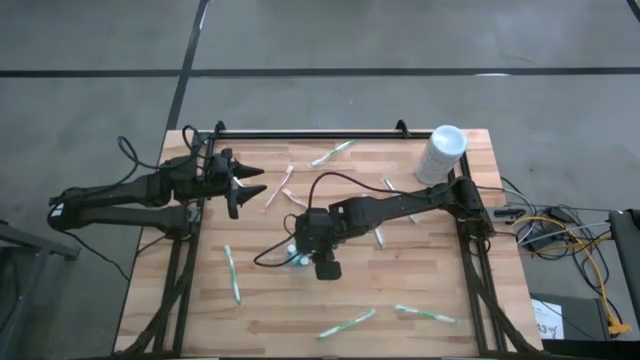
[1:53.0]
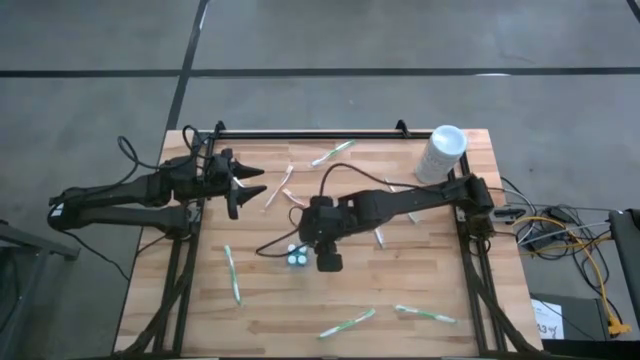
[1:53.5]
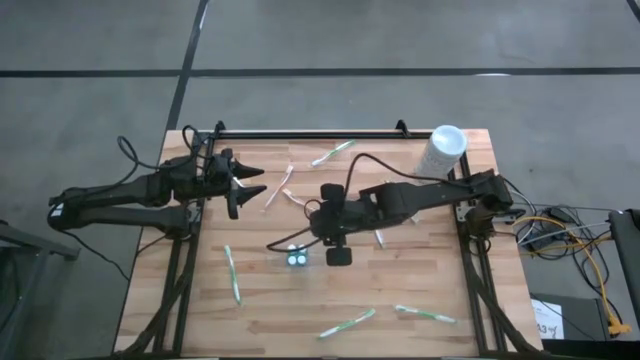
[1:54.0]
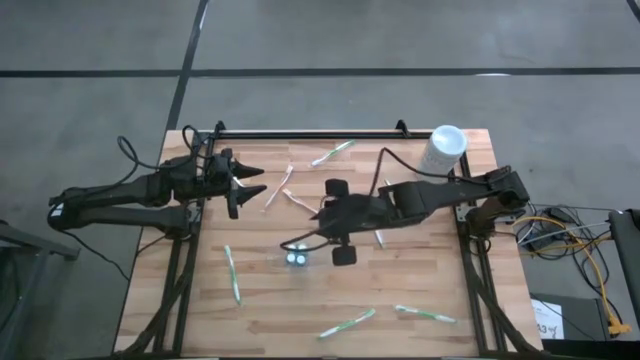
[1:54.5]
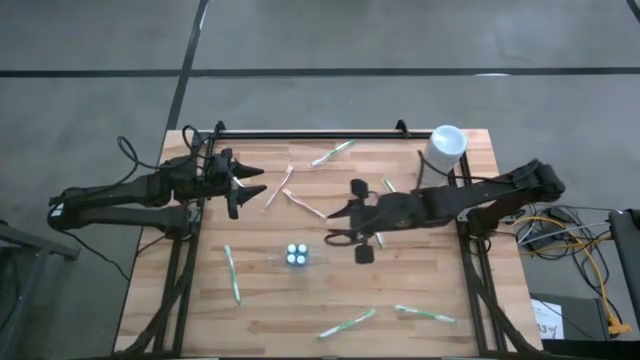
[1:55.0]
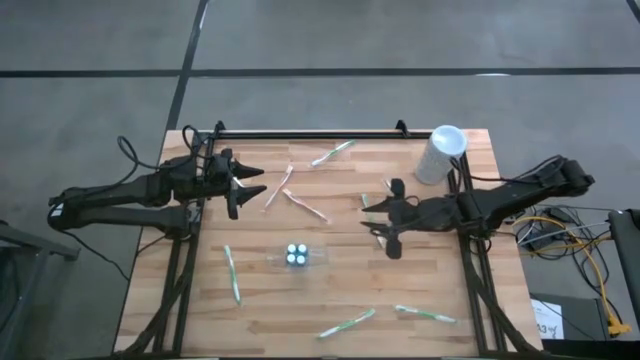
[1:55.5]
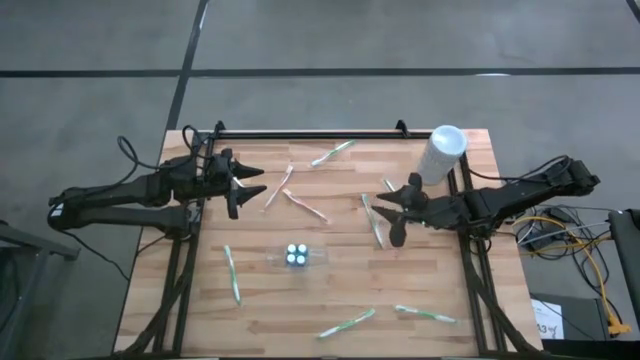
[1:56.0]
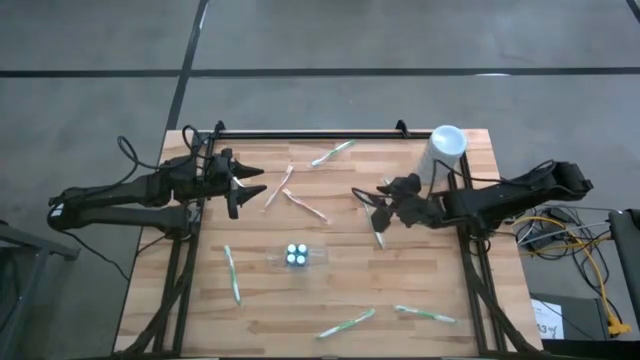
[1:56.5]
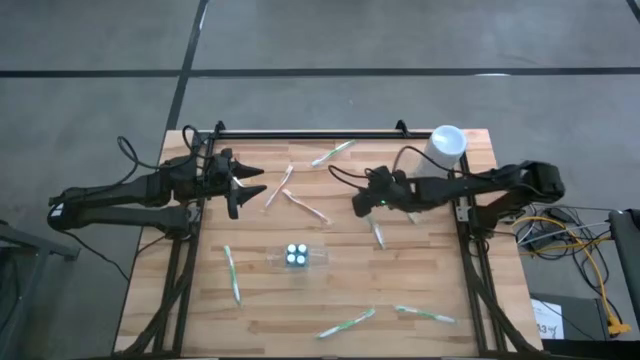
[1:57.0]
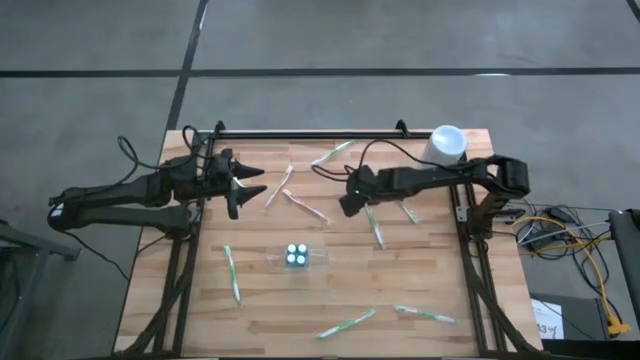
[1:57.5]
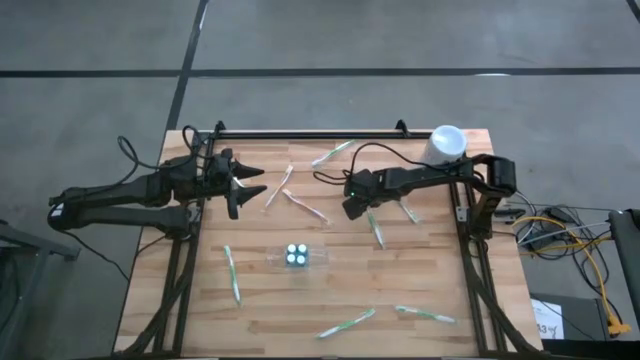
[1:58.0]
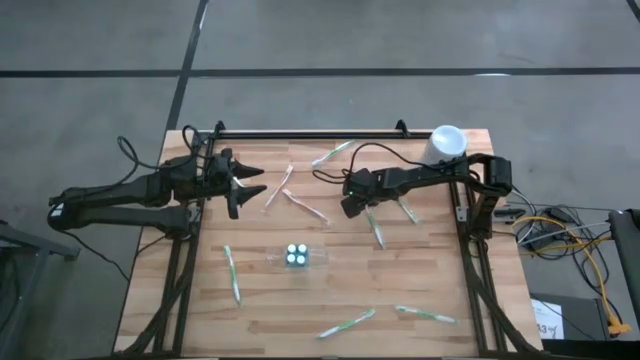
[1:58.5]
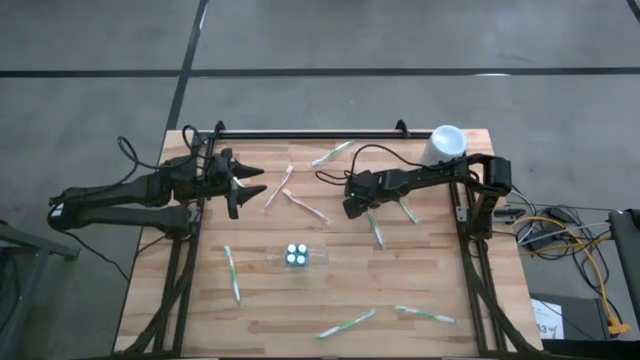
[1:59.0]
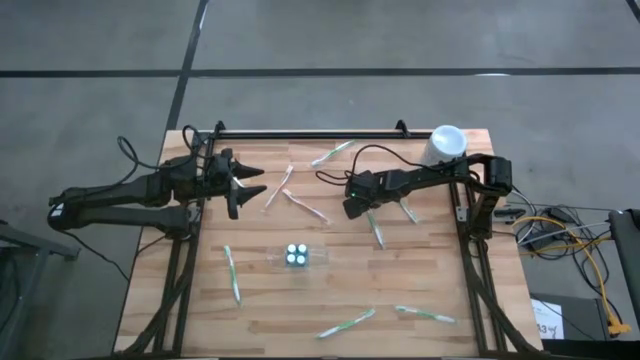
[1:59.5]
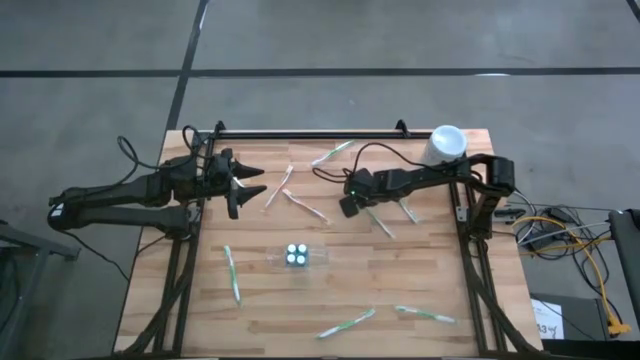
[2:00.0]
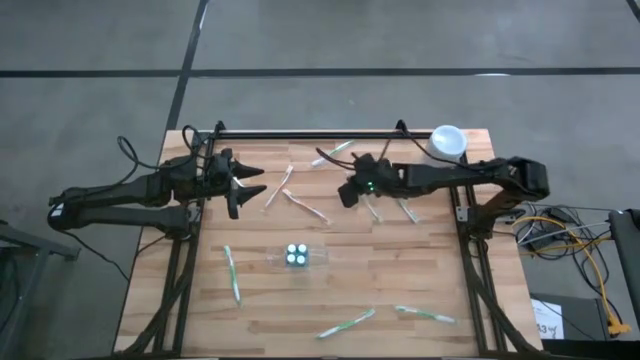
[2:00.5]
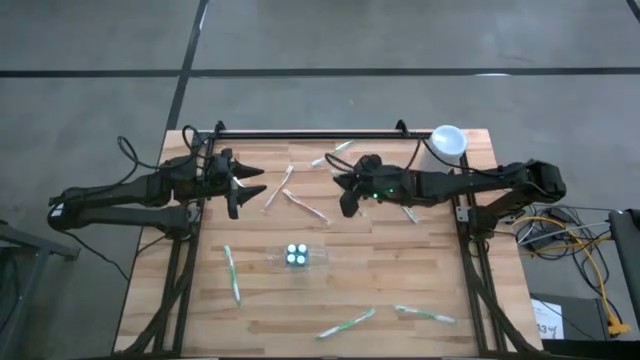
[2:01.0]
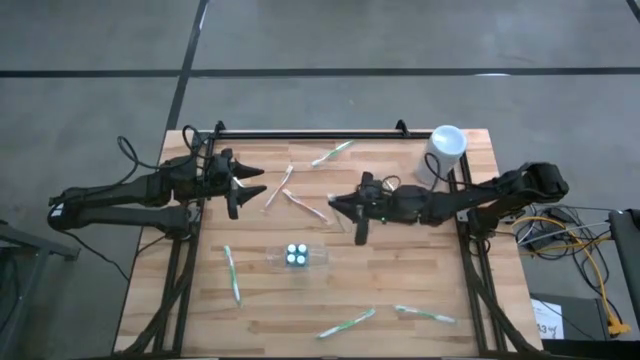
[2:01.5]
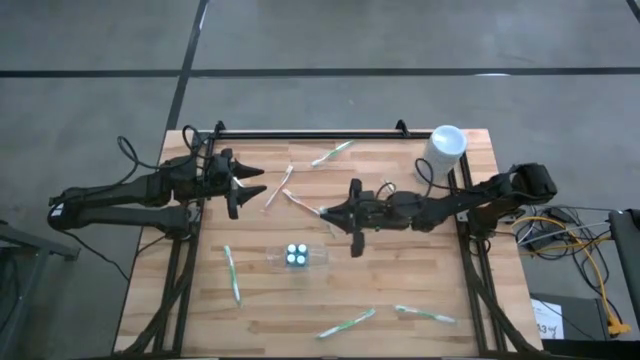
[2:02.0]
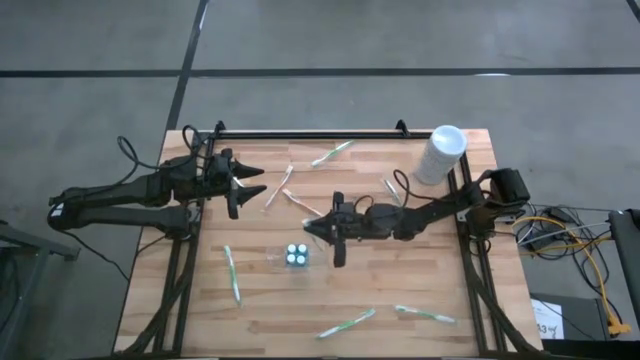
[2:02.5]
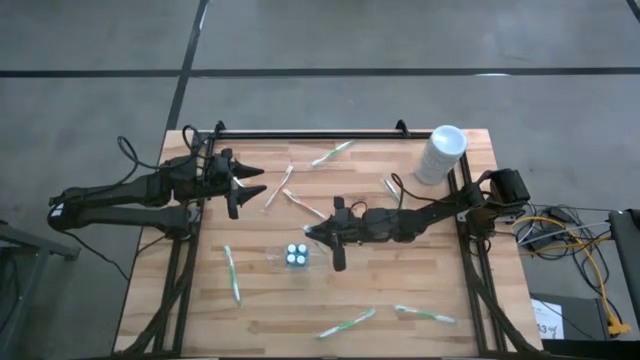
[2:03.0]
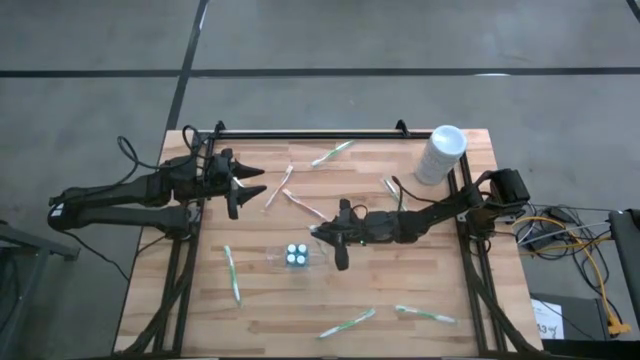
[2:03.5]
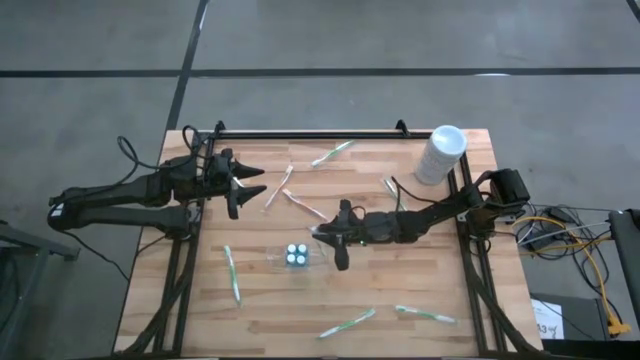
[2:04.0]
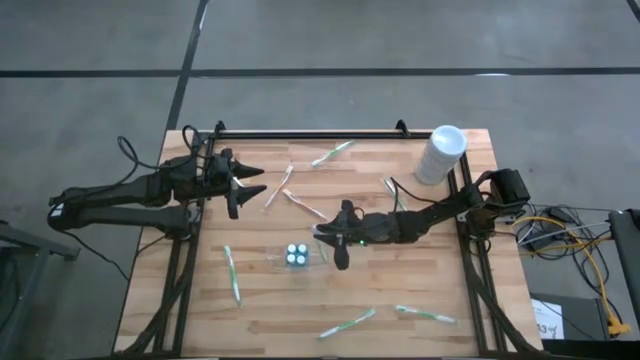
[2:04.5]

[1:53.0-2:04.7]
Task: Pick & Place toothbrushing station
Put the green toothbrush into the transparent organizer

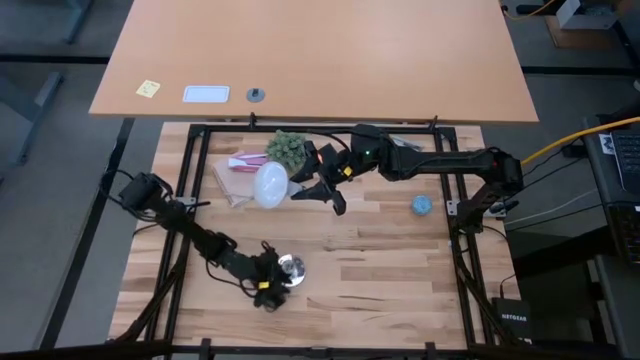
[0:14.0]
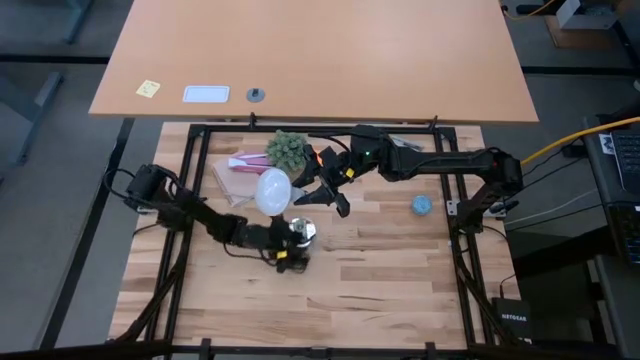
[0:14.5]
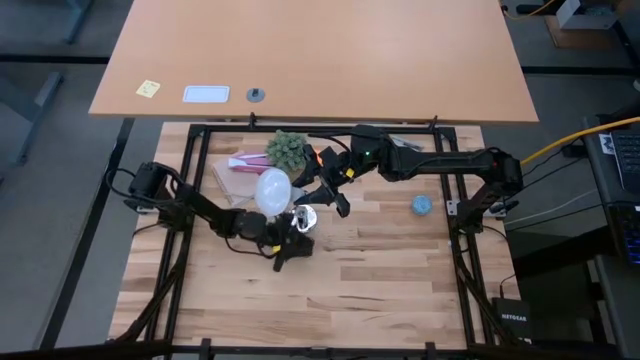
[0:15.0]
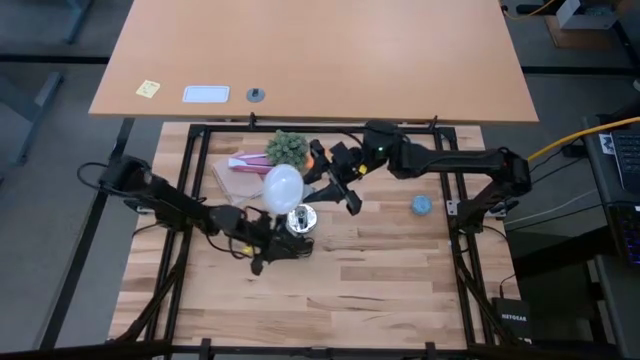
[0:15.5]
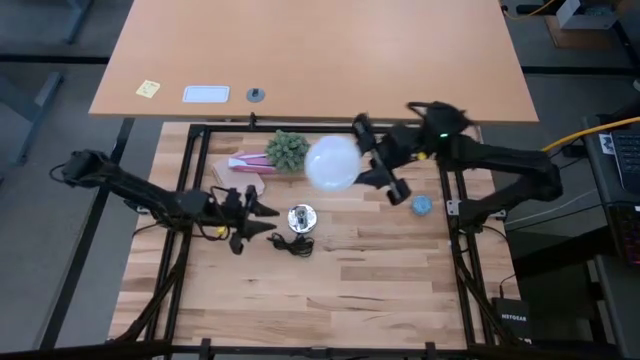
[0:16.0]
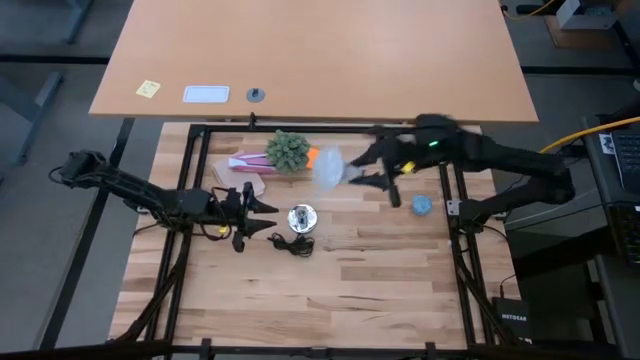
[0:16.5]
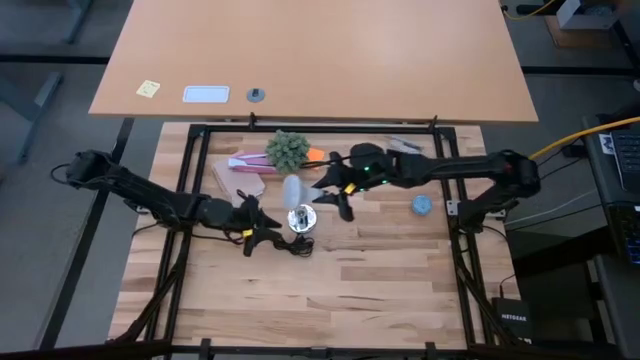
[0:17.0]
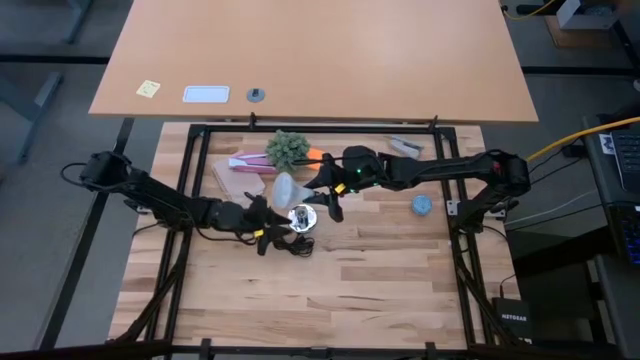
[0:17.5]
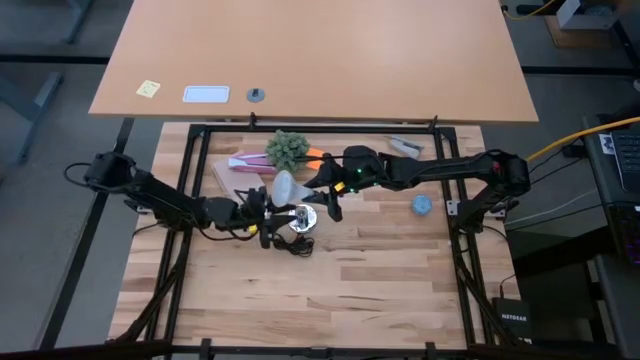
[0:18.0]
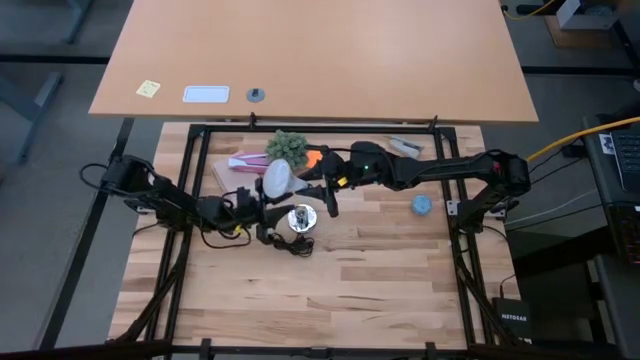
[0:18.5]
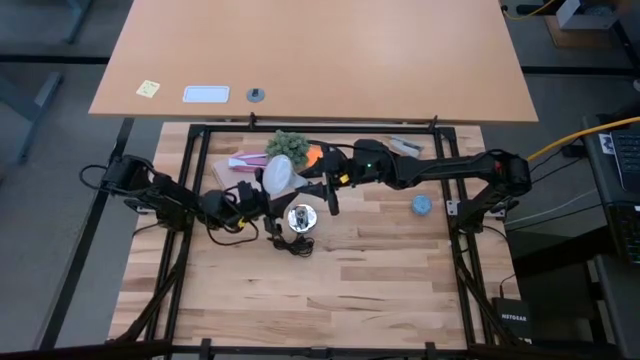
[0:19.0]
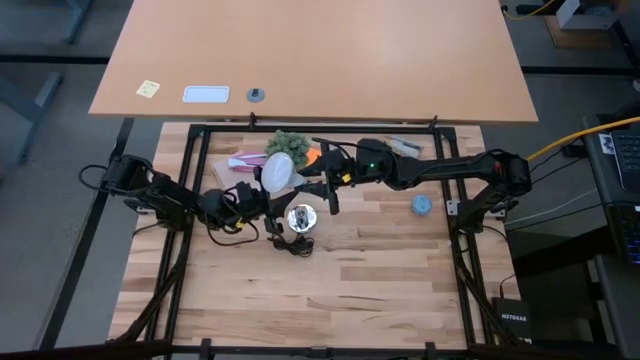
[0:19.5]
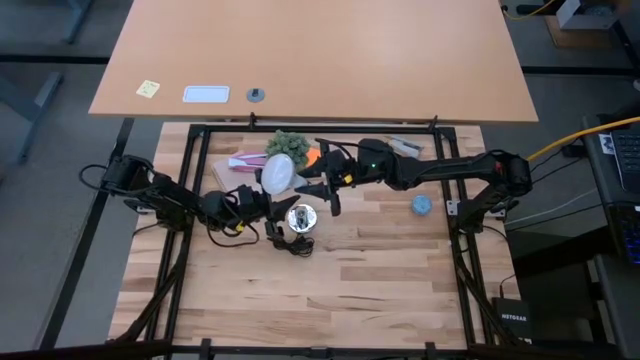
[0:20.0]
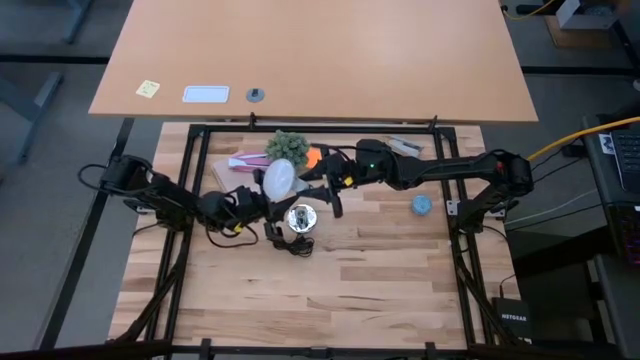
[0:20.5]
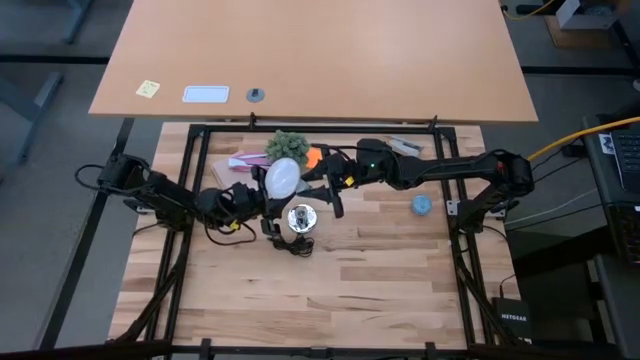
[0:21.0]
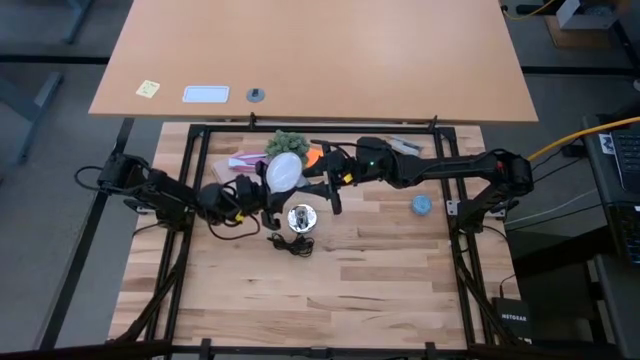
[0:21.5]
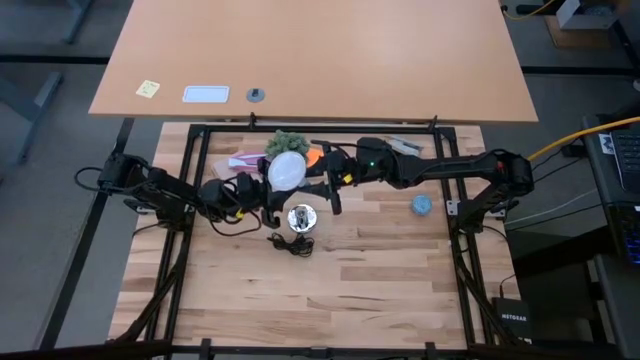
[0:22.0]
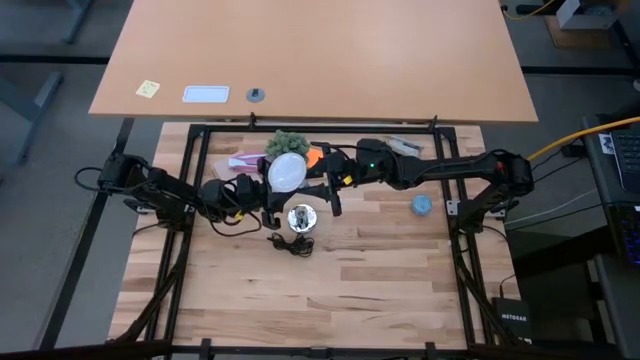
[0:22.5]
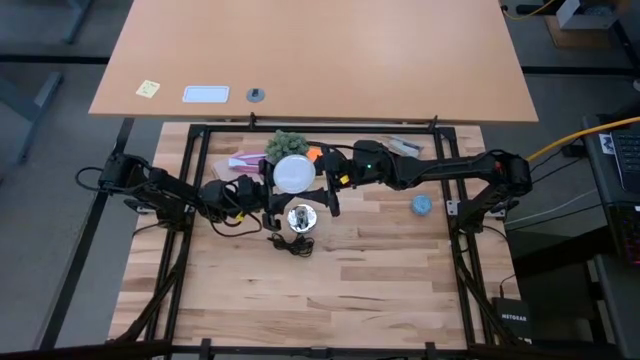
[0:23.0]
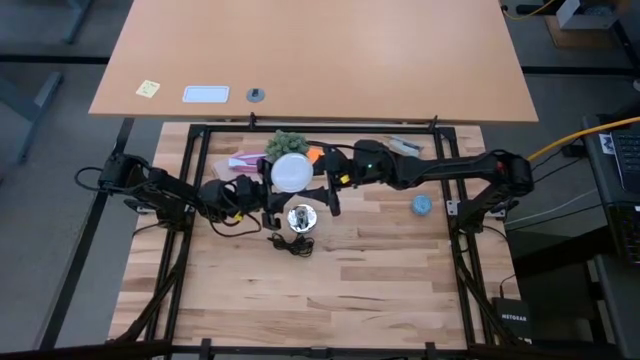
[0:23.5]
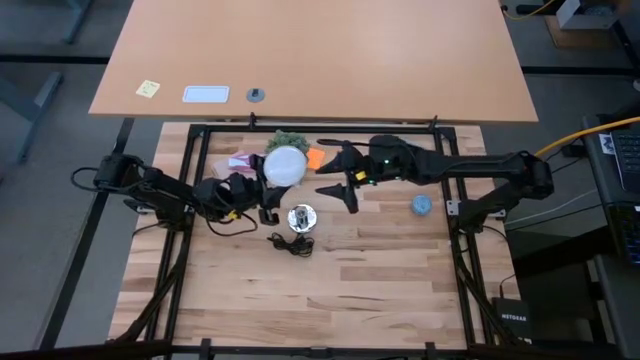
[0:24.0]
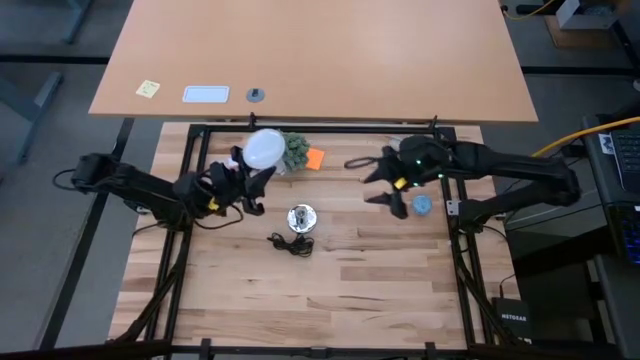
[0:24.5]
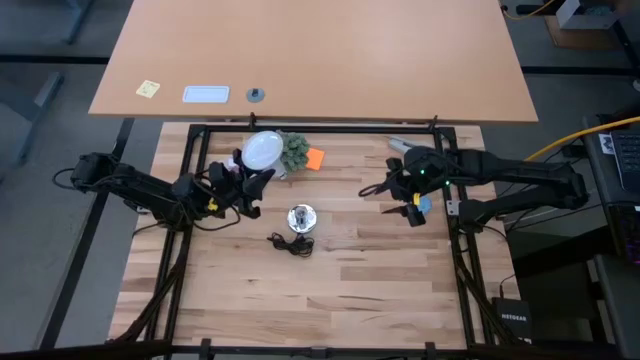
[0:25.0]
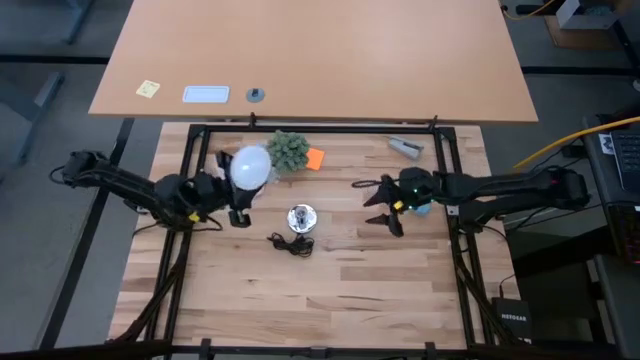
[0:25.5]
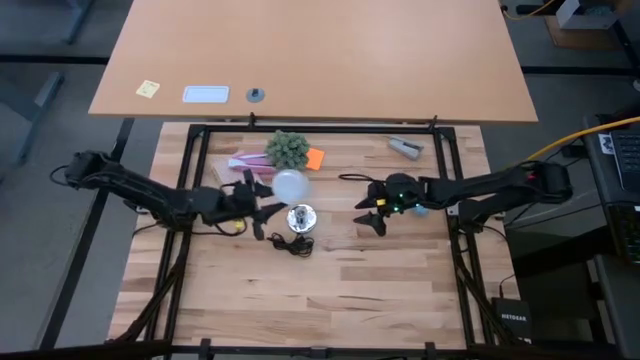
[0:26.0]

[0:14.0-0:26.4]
Task: Screw lightbulb
Insert the lightbulb into the lamp
